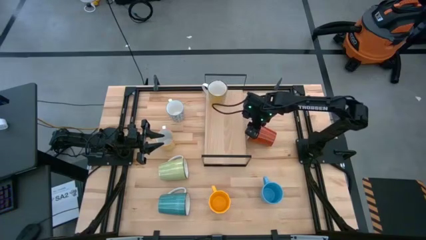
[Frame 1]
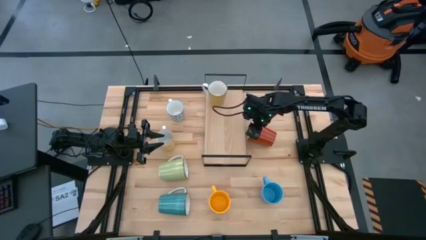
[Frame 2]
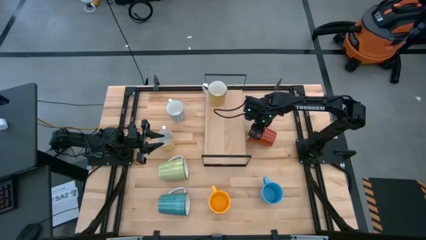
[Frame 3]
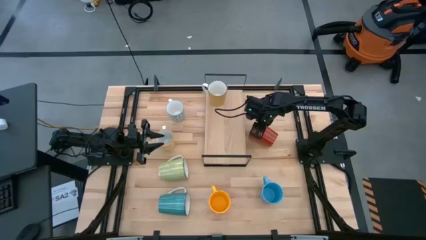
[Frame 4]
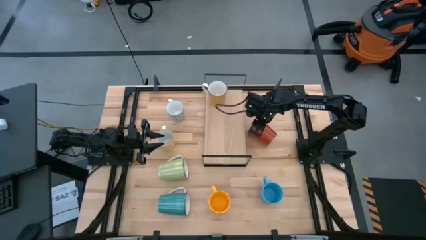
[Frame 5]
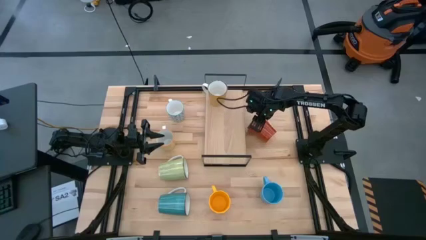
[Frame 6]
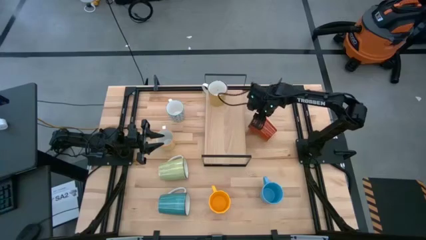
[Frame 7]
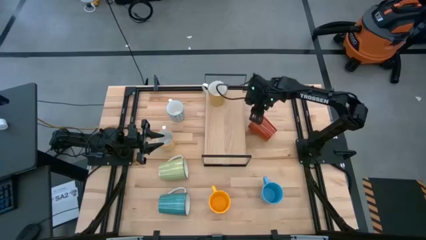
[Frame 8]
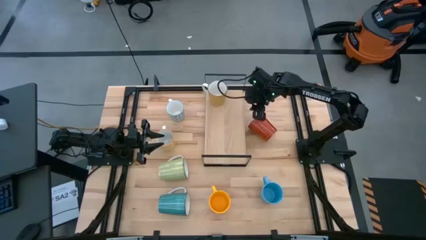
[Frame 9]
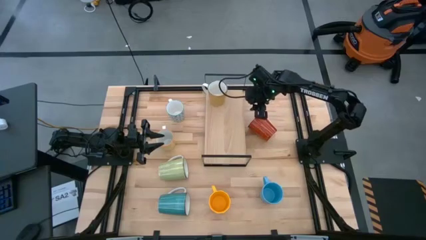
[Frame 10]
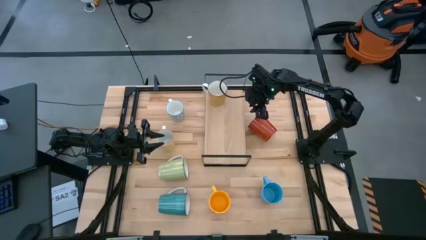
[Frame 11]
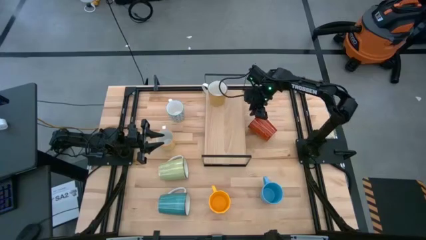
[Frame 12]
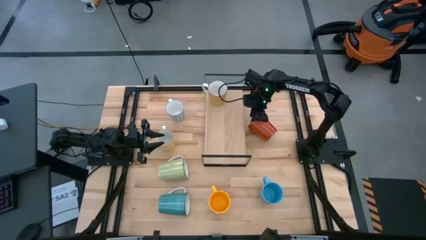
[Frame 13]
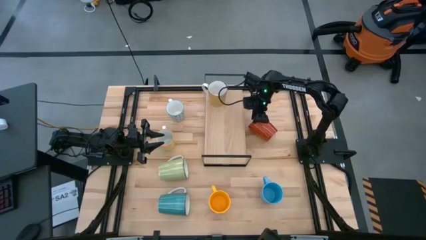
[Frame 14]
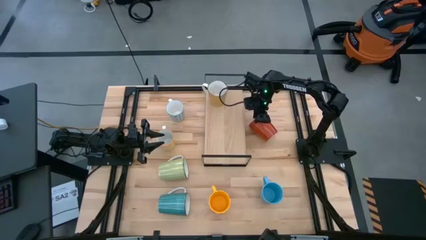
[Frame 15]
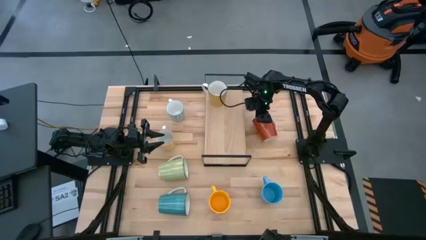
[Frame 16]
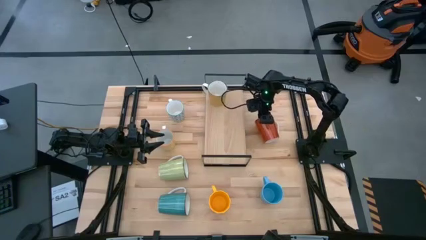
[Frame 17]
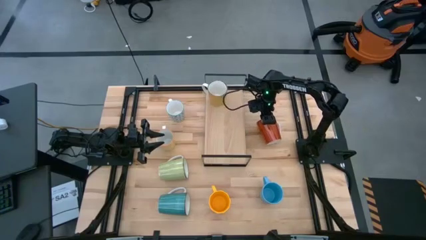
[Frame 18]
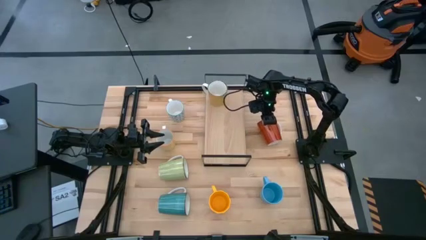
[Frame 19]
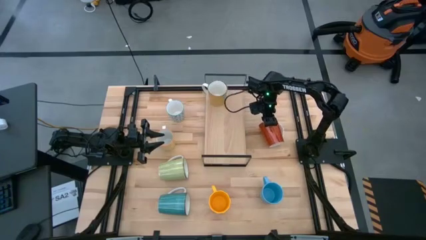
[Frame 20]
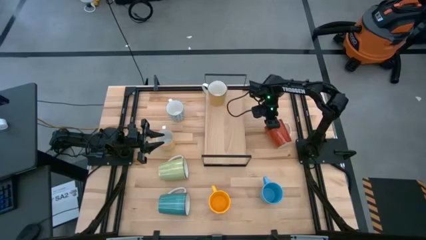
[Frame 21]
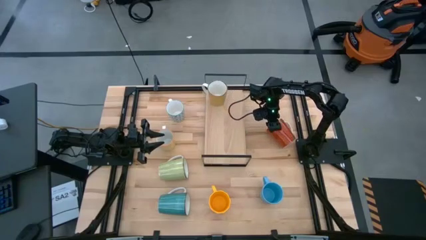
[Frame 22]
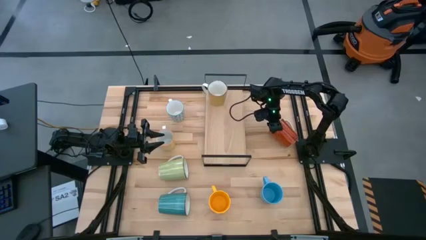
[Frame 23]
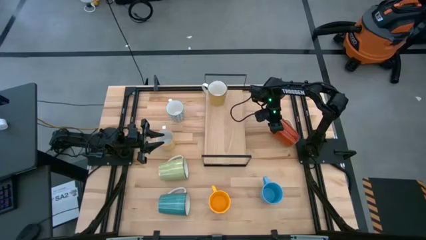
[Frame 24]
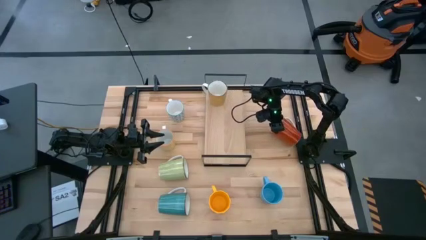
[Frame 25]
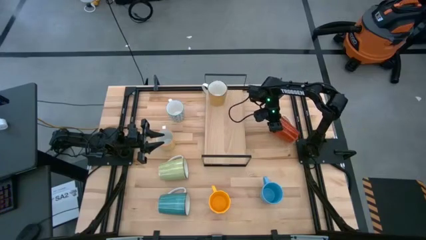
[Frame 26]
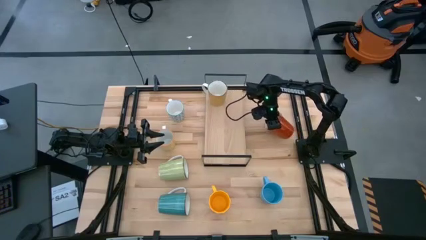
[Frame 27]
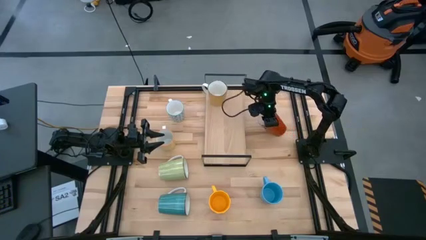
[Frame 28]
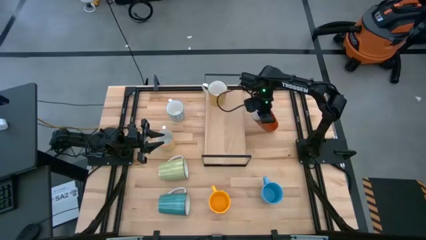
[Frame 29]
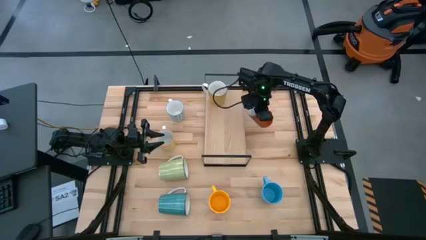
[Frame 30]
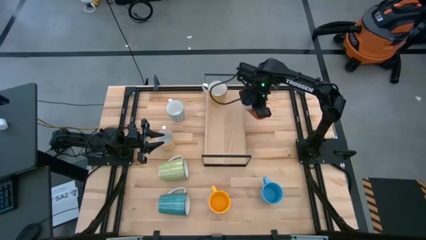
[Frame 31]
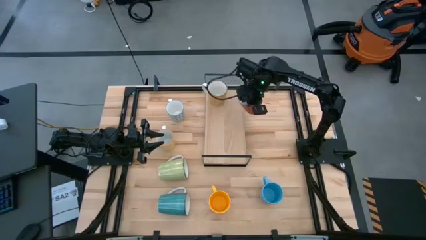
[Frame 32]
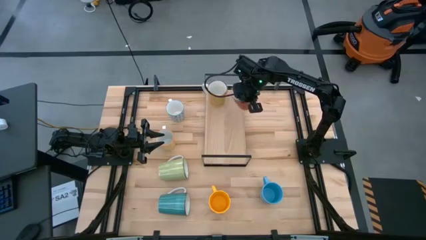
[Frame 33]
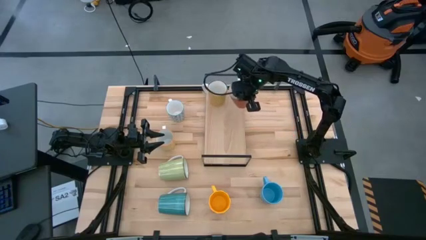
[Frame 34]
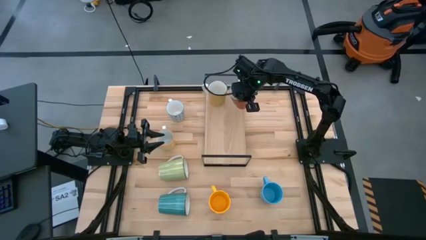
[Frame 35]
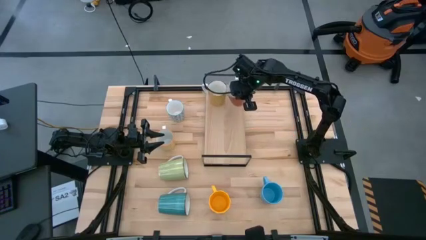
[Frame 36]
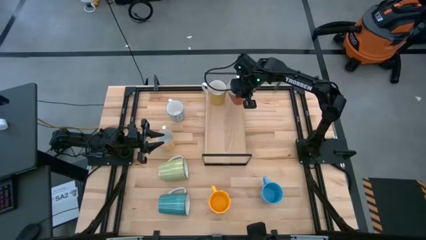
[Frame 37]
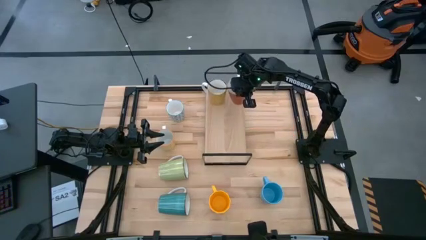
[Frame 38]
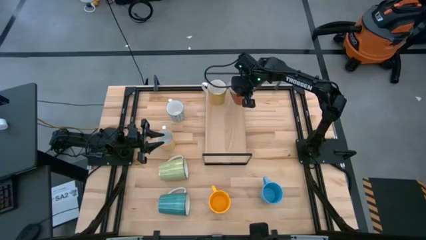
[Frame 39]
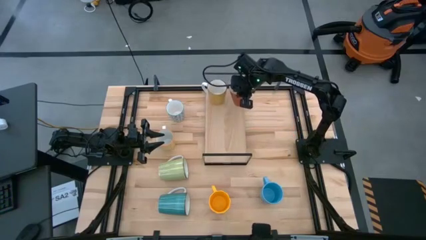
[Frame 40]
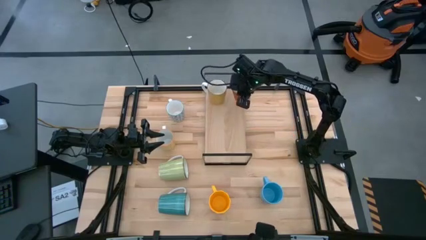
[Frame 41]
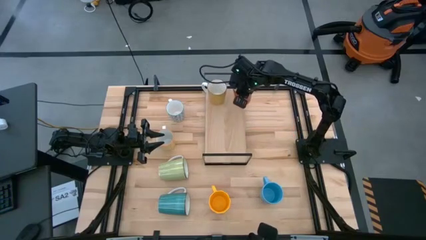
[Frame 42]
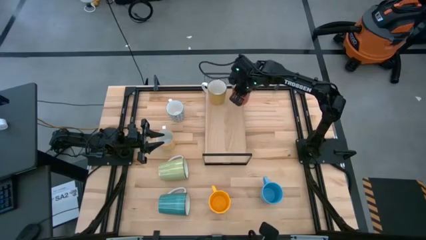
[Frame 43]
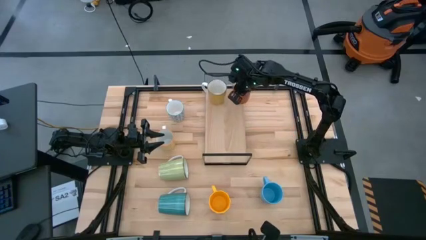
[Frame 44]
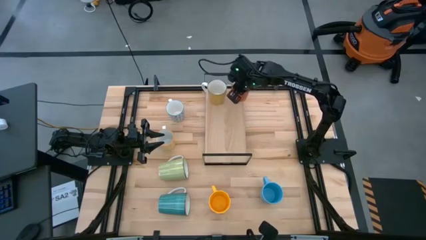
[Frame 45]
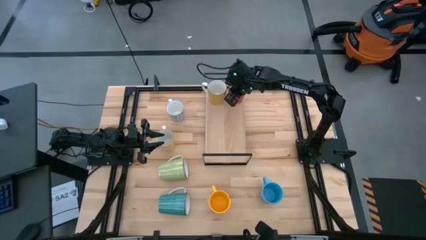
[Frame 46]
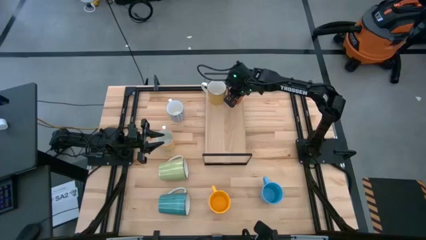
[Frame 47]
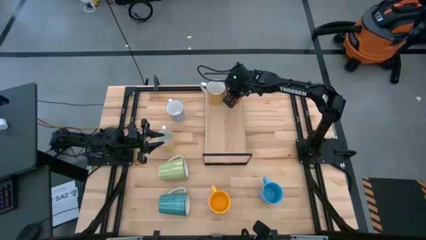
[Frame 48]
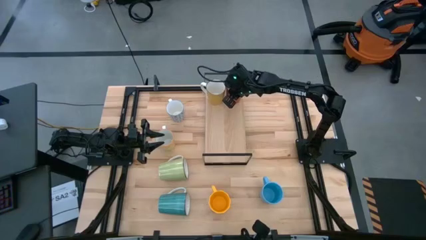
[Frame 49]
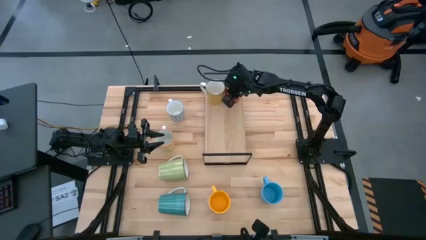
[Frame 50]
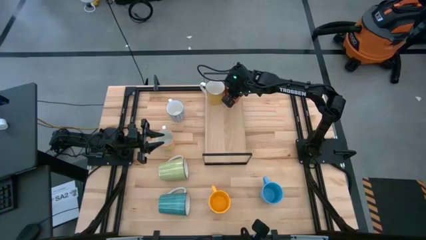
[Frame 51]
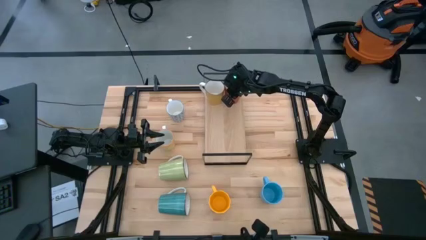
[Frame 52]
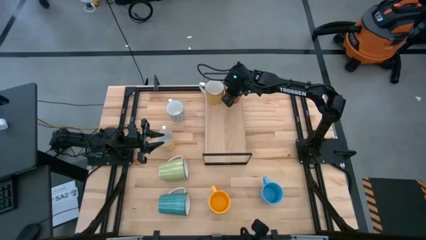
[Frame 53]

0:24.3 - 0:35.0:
Task: Place coffee mugs
Put the orange mug on the shelf
